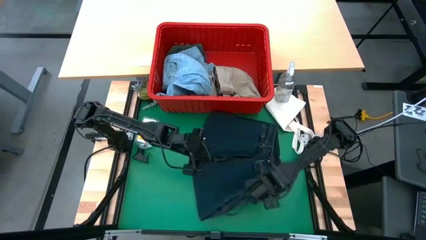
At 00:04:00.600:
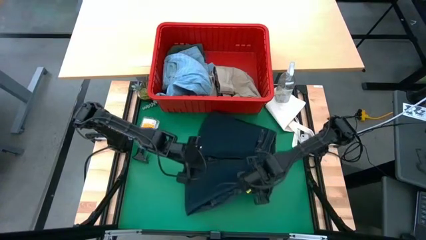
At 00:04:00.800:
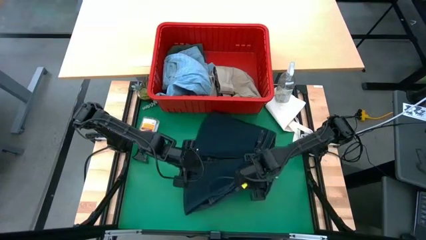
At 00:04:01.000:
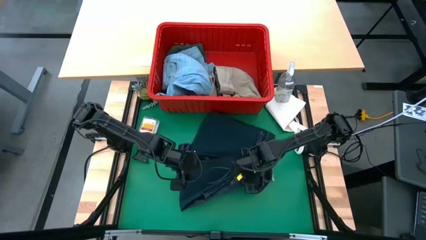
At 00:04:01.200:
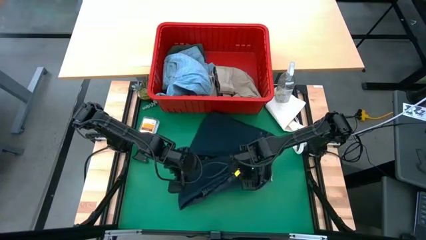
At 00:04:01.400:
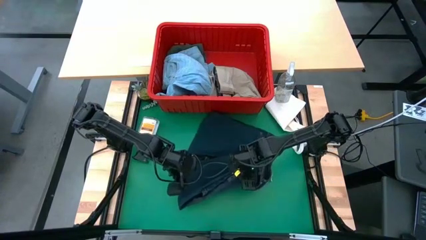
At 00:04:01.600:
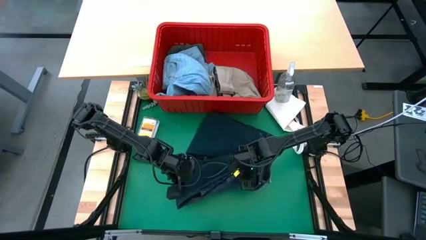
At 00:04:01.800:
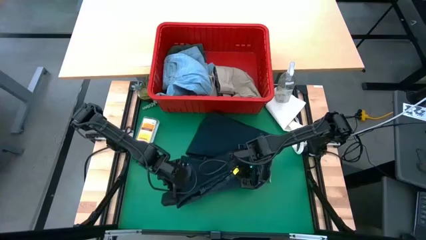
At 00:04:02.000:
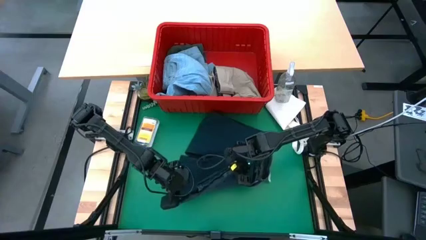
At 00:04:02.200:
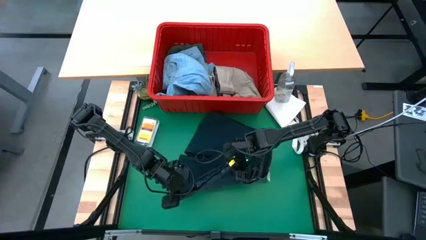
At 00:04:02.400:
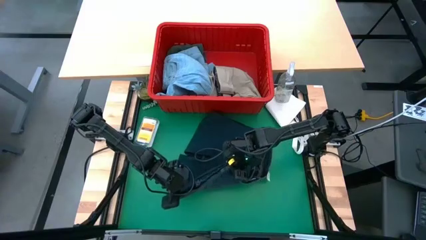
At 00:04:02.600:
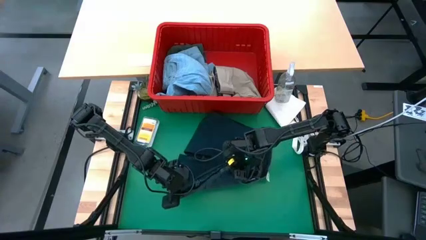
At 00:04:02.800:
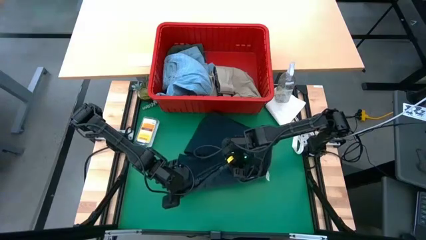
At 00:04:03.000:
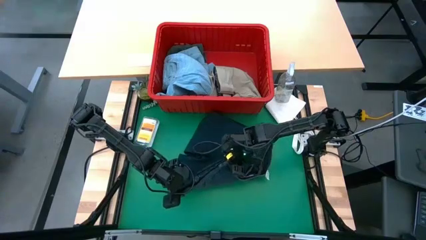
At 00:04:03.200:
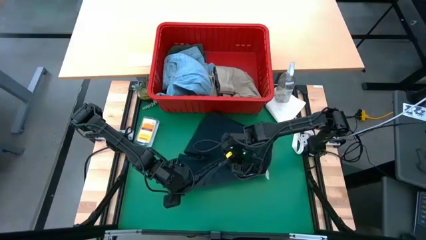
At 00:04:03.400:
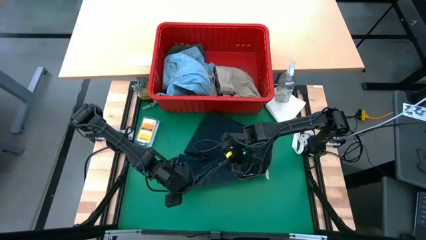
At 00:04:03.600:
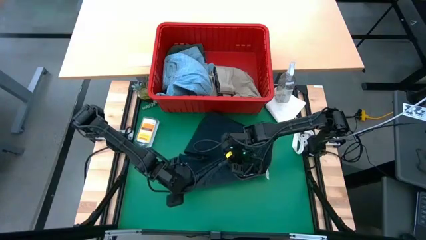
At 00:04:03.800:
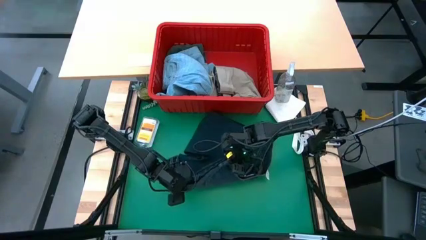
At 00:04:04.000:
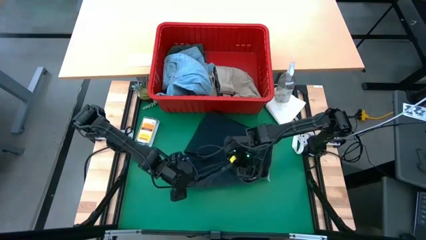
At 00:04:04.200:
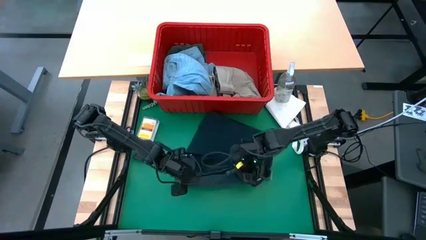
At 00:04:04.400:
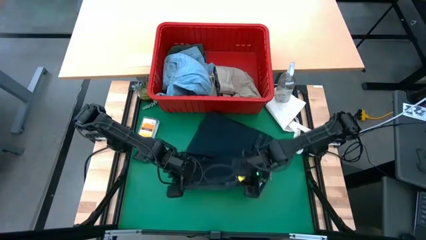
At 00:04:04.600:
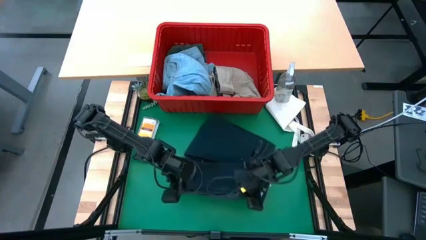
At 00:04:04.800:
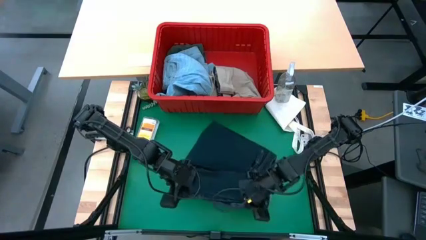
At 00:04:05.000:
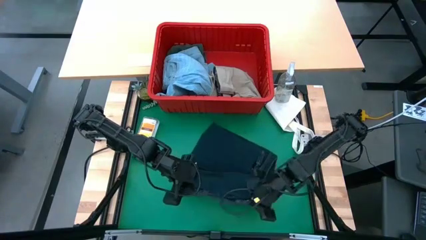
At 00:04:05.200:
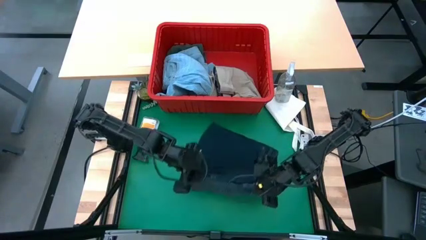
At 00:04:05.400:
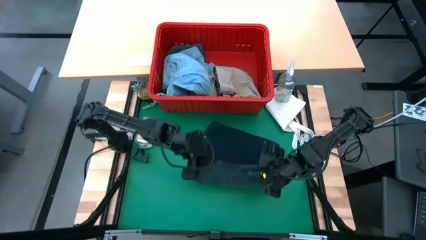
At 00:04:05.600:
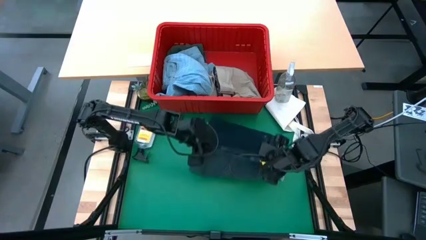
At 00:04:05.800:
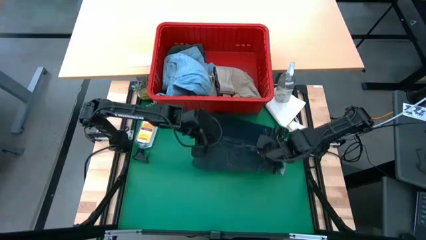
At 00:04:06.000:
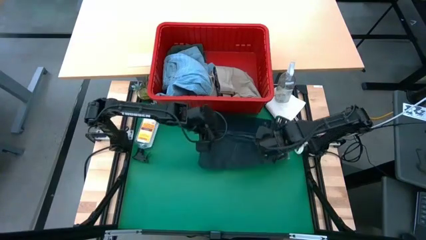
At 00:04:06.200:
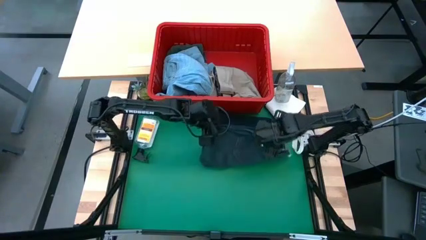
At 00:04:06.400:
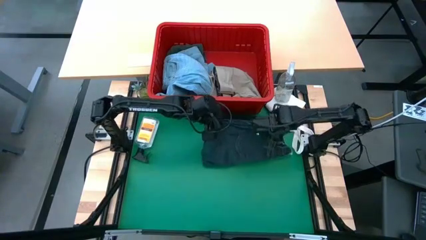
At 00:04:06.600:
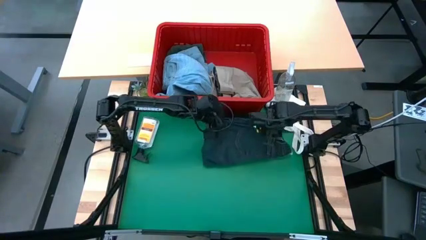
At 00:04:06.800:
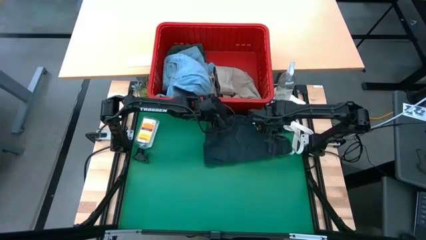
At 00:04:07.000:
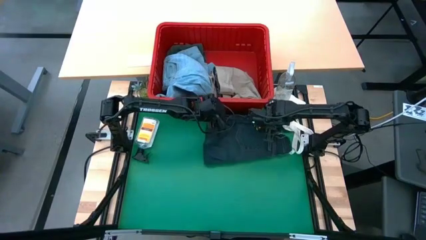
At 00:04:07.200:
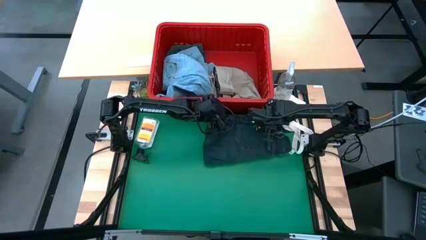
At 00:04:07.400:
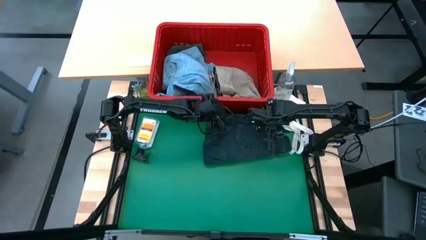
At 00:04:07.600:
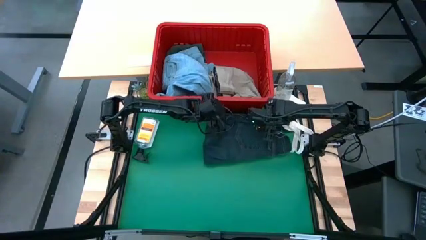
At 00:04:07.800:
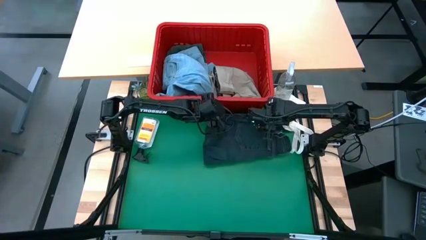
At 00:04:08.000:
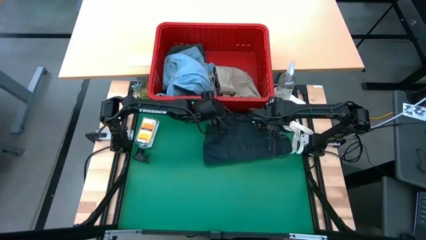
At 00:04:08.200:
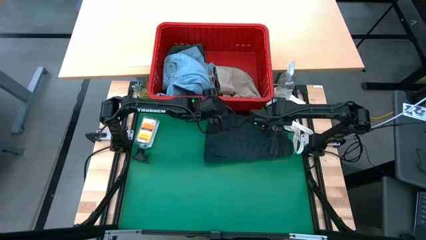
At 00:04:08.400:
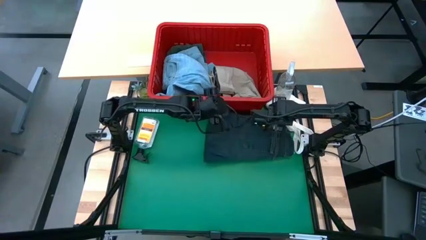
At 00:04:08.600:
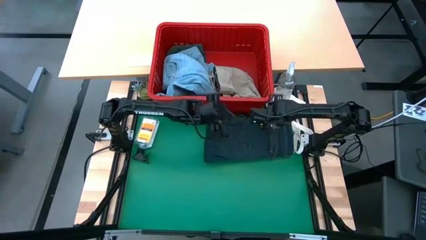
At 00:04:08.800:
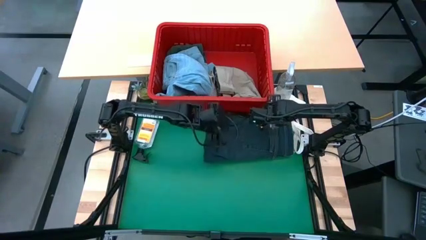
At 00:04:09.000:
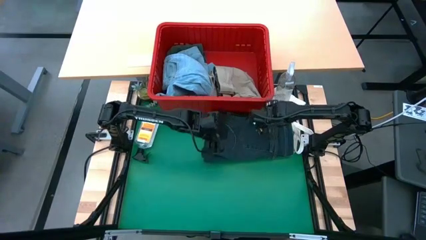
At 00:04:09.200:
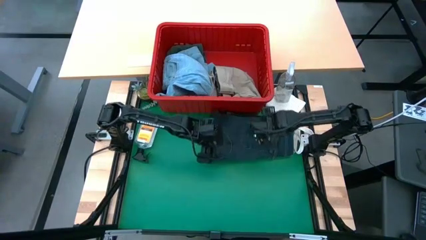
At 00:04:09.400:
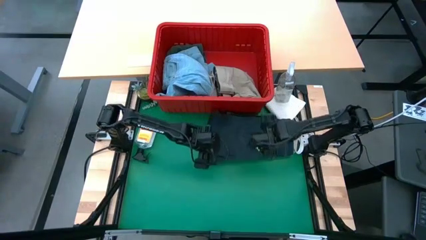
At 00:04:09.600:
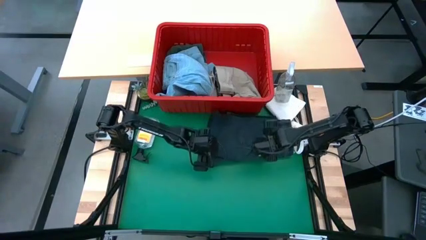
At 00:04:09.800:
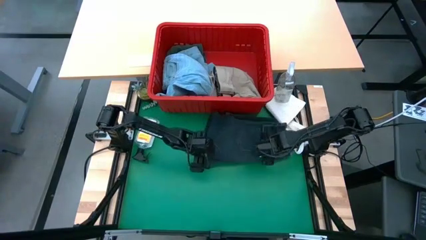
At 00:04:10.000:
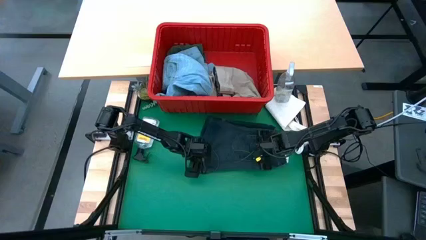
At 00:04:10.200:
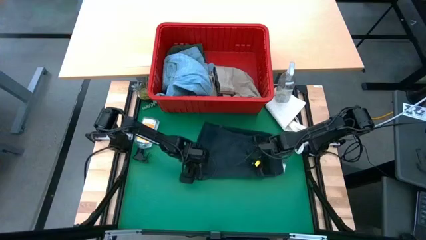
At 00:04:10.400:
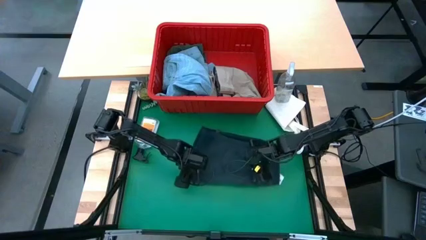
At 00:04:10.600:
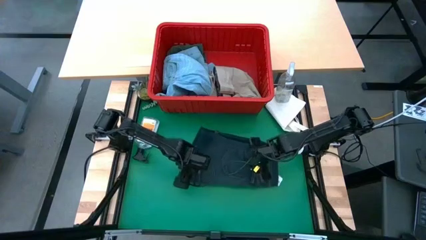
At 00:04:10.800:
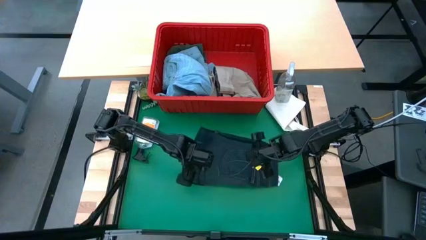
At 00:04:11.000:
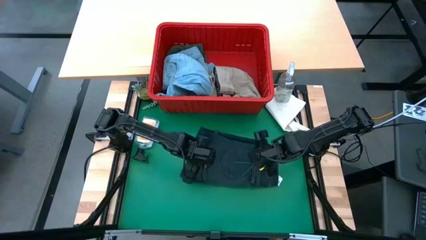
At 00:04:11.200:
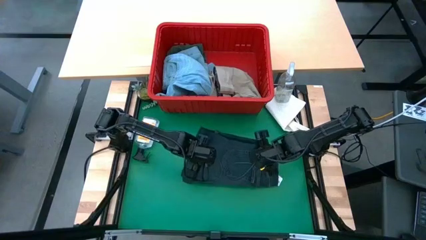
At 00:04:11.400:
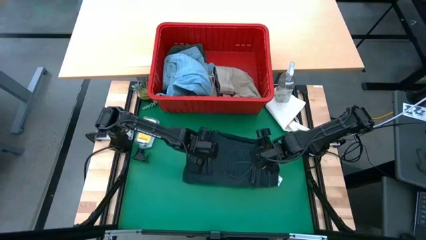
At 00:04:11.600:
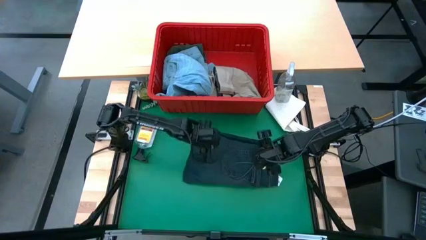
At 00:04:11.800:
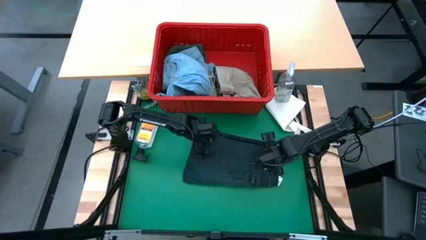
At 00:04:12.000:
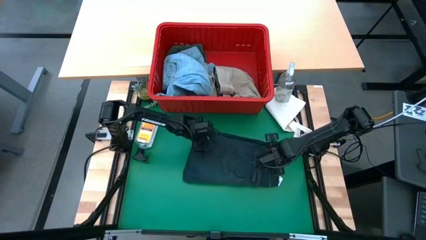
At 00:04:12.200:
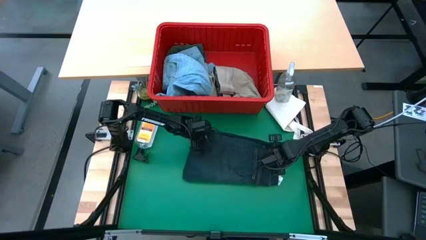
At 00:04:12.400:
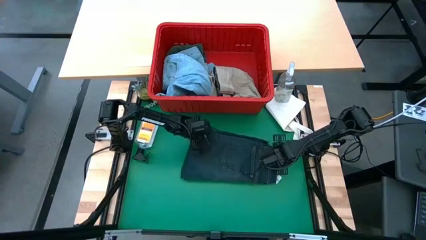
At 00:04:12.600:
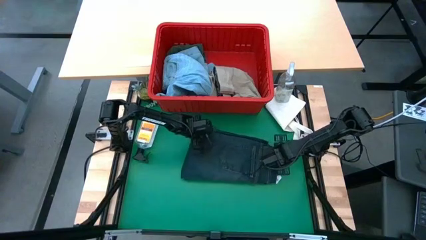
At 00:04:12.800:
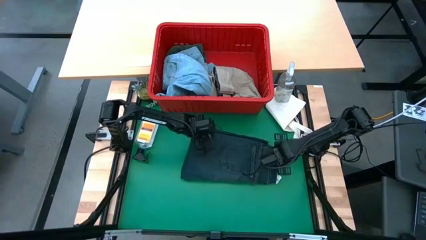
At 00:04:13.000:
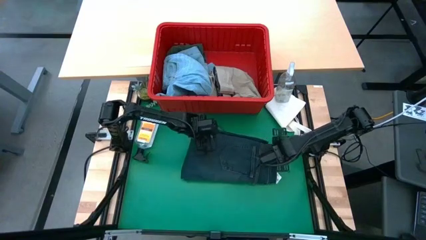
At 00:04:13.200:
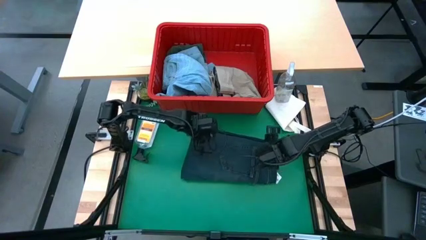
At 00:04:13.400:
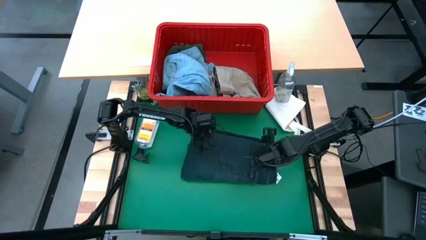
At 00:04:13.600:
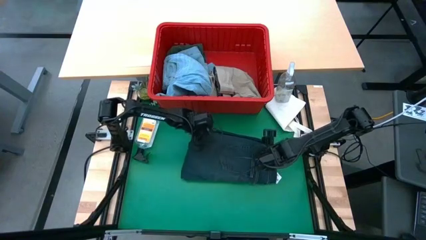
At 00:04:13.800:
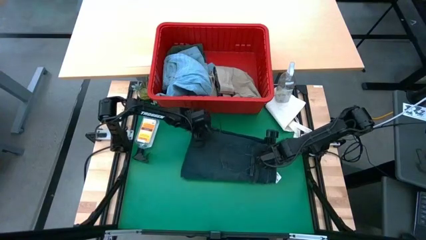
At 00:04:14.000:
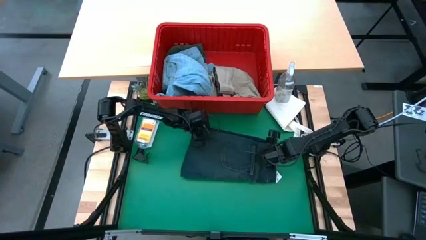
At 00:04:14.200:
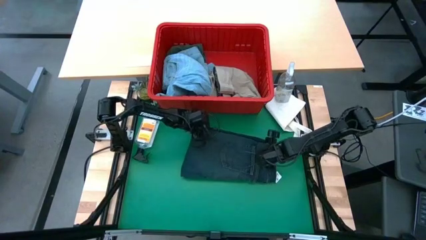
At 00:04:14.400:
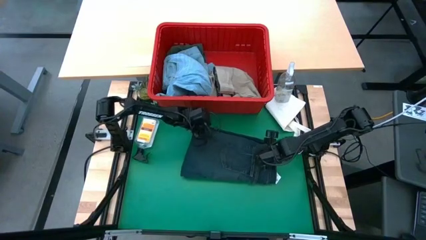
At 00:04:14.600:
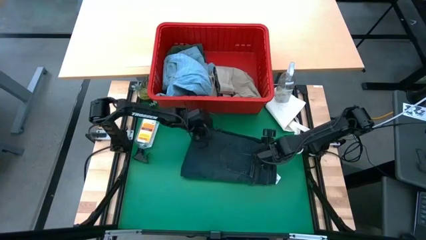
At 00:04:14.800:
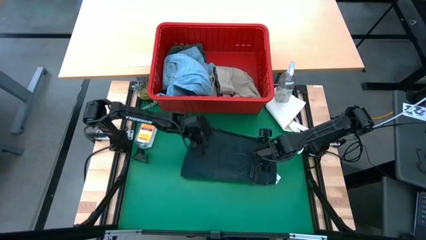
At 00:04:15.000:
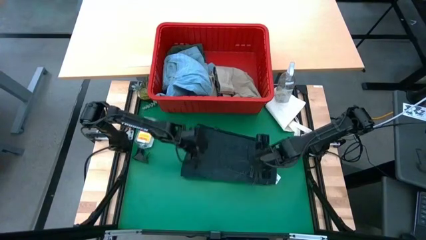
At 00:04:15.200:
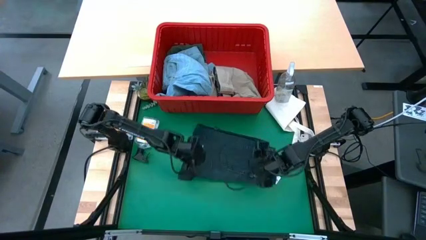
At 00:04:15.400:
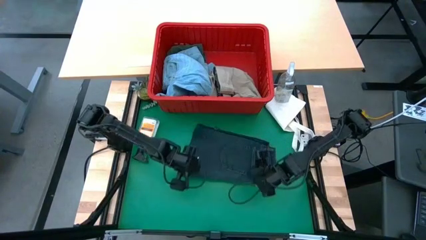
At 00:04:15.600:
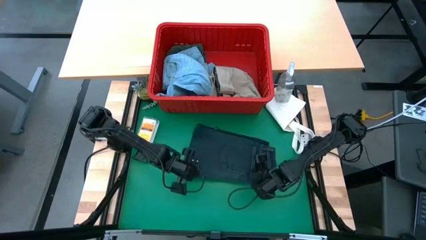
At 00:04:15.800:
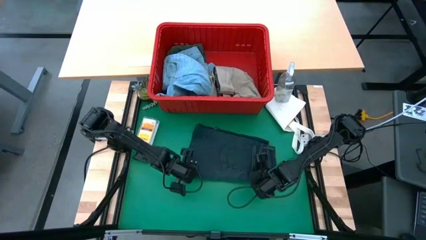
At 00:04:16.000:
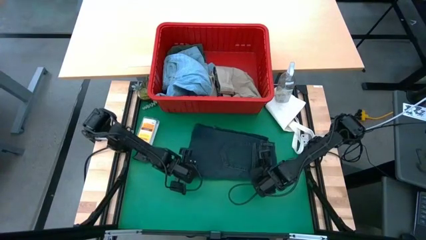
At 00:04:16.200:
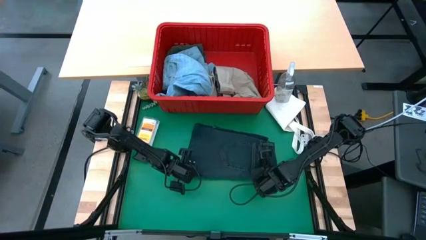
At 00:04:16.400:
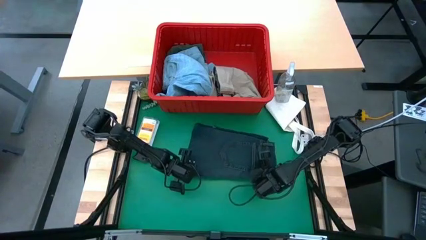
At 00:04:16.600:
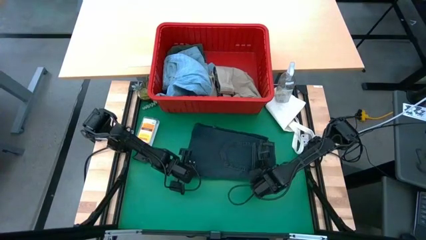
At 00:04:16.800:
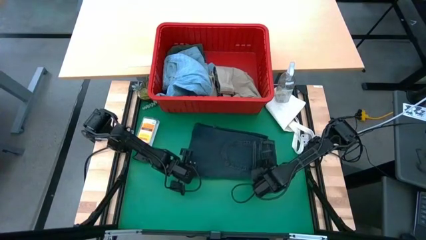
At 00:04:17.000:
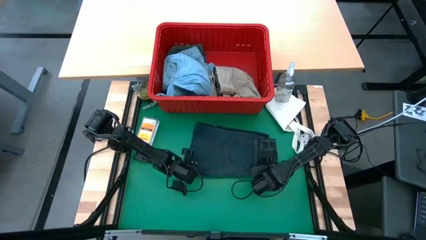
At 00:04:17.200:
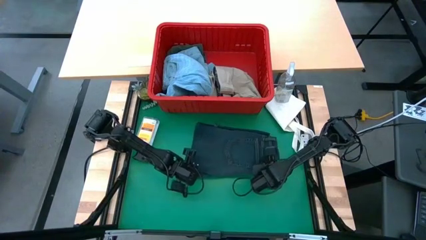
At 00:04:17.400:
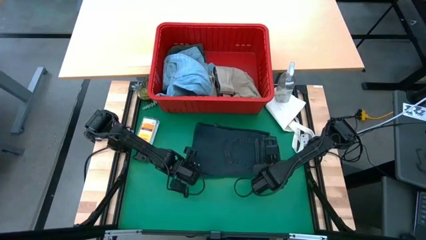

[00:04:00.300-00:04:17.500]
Task: Fold laundry
Fold the dark blue jeans
